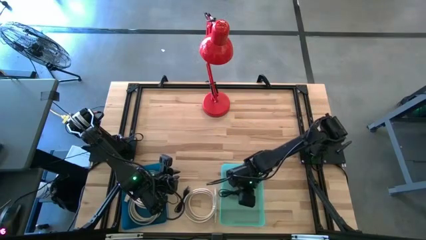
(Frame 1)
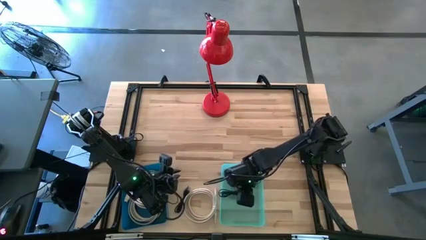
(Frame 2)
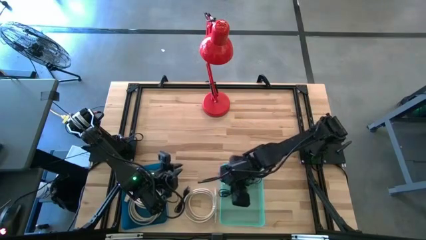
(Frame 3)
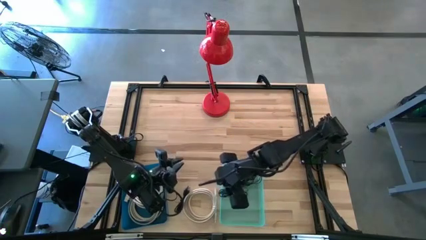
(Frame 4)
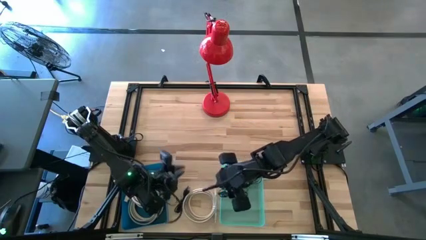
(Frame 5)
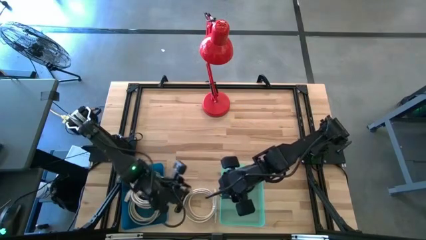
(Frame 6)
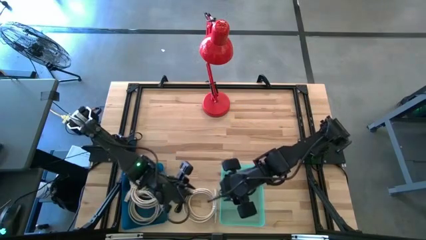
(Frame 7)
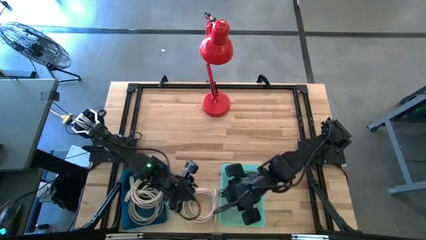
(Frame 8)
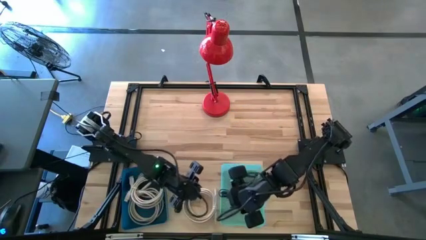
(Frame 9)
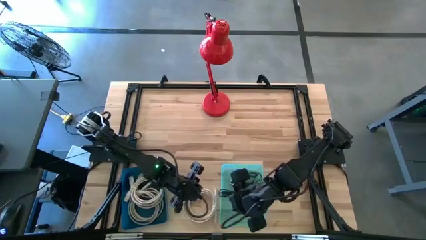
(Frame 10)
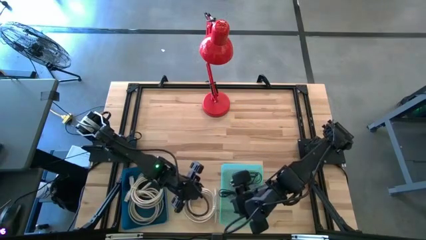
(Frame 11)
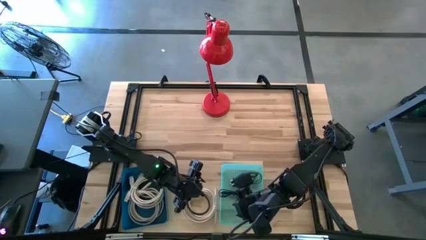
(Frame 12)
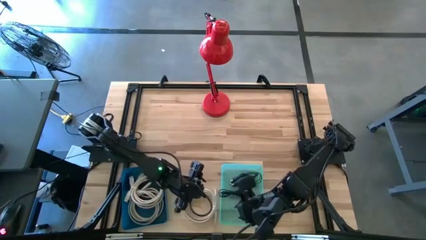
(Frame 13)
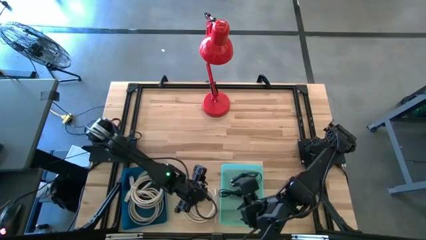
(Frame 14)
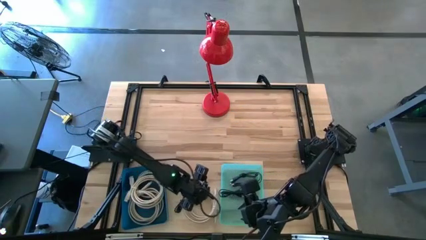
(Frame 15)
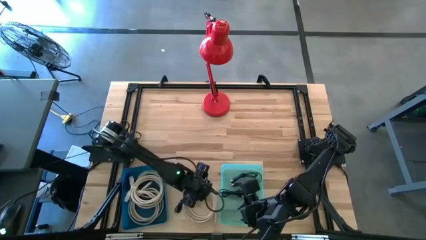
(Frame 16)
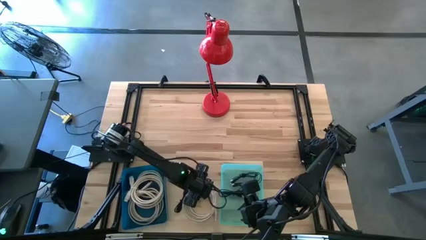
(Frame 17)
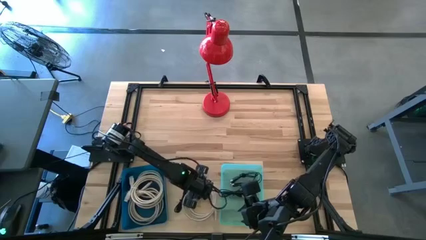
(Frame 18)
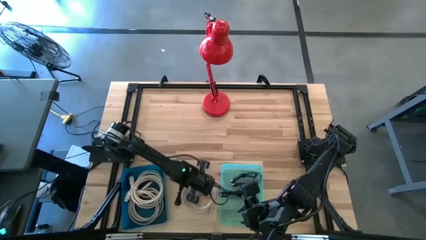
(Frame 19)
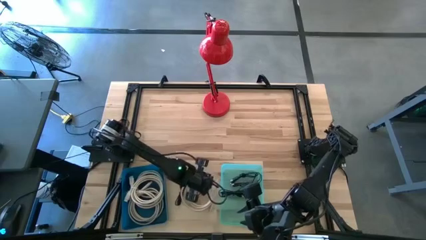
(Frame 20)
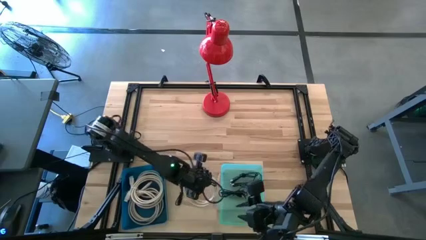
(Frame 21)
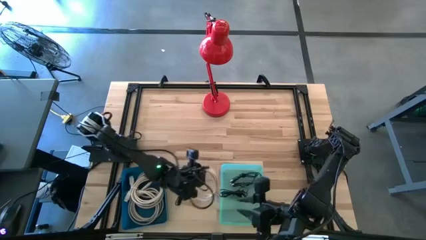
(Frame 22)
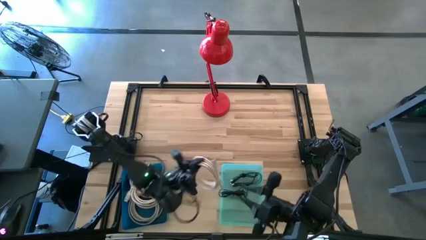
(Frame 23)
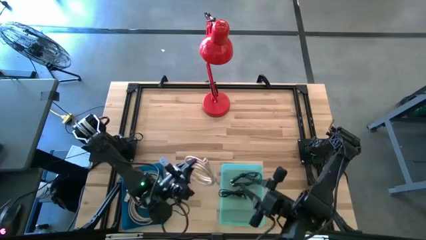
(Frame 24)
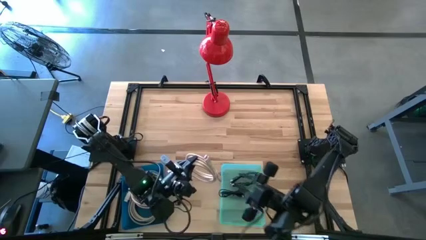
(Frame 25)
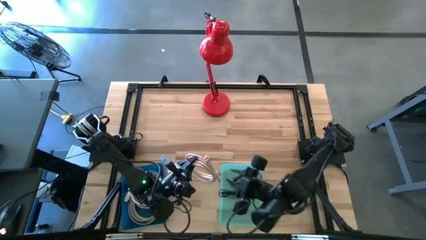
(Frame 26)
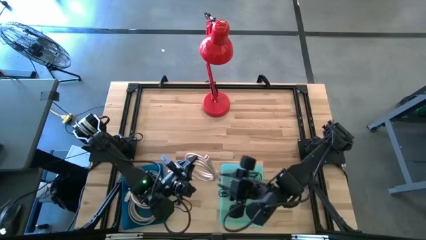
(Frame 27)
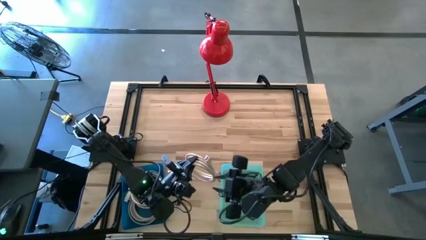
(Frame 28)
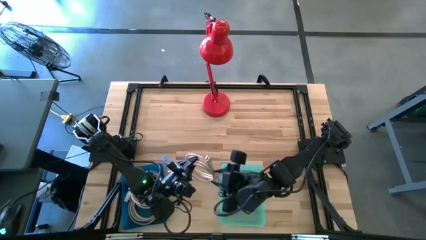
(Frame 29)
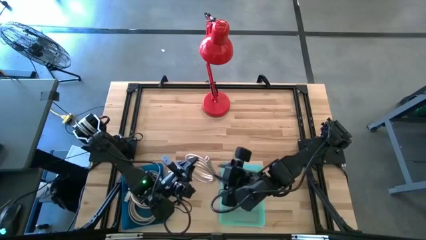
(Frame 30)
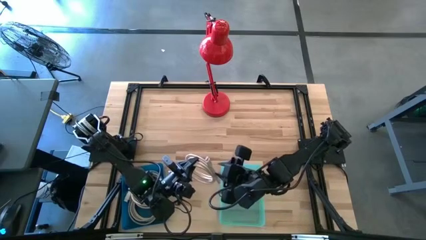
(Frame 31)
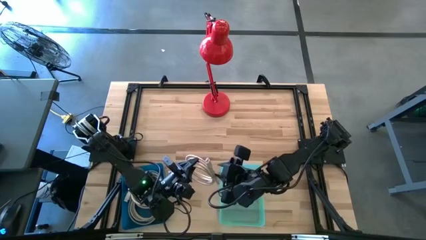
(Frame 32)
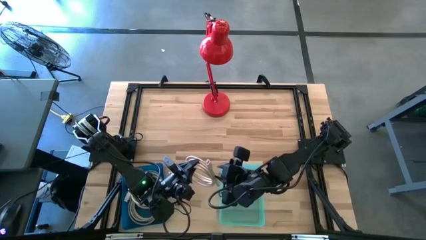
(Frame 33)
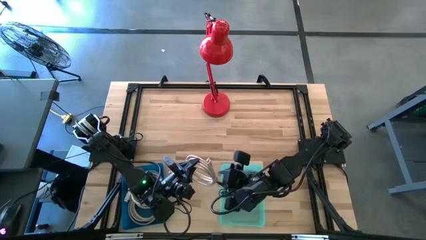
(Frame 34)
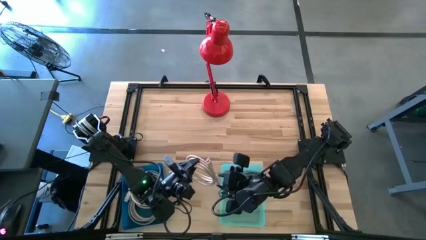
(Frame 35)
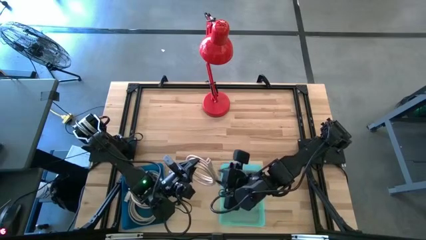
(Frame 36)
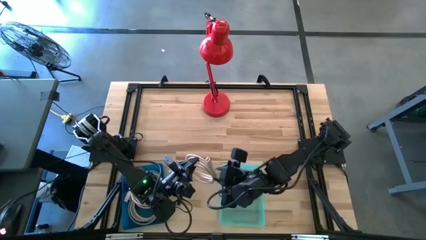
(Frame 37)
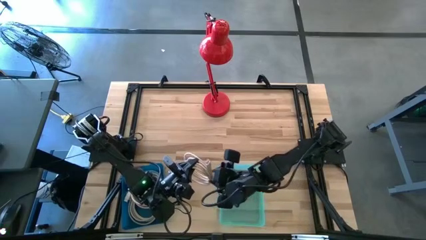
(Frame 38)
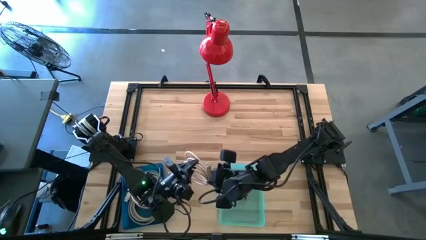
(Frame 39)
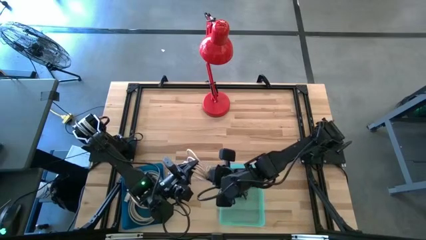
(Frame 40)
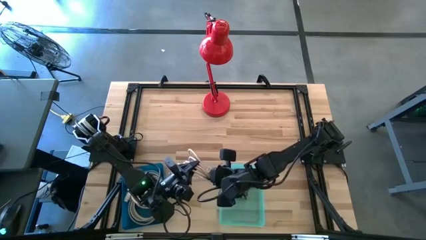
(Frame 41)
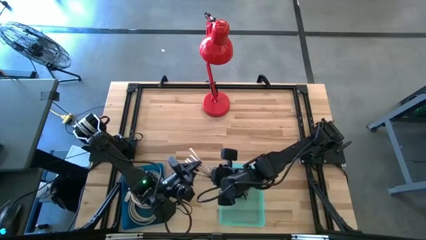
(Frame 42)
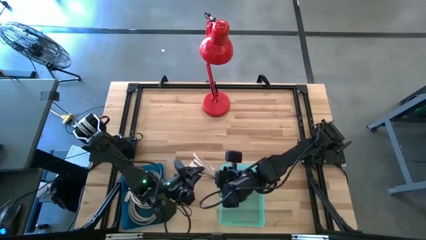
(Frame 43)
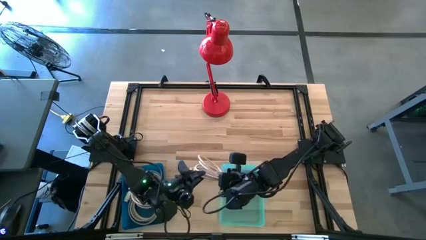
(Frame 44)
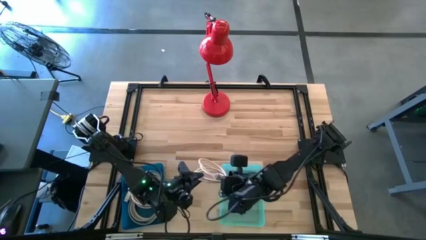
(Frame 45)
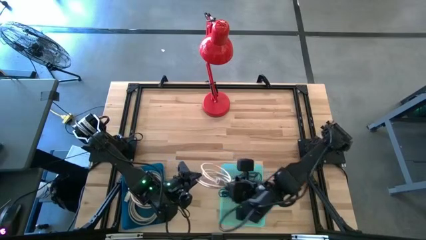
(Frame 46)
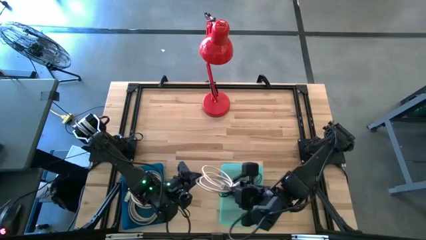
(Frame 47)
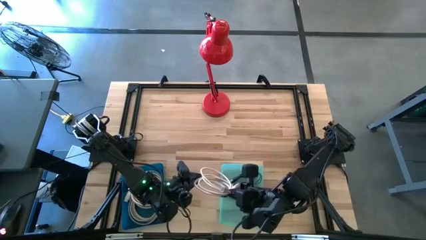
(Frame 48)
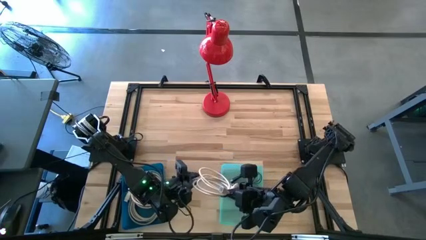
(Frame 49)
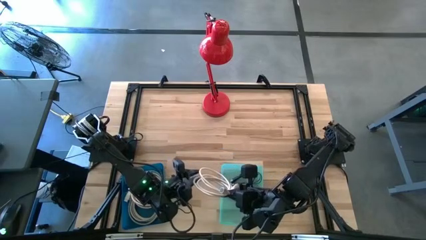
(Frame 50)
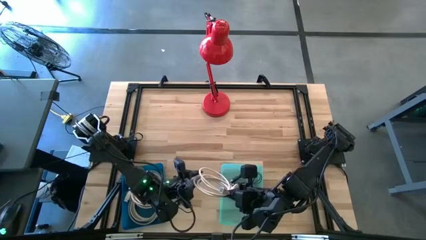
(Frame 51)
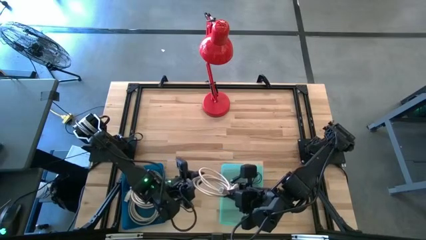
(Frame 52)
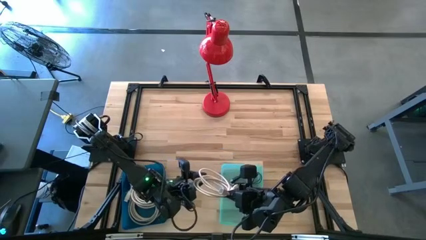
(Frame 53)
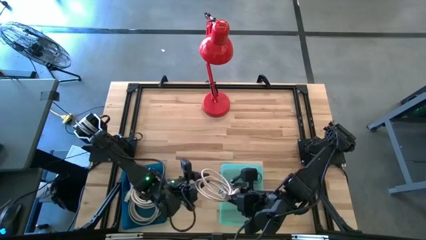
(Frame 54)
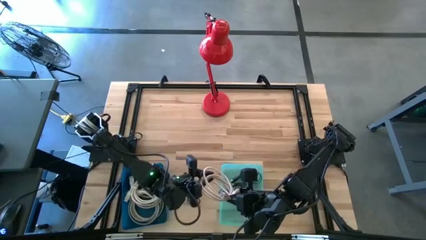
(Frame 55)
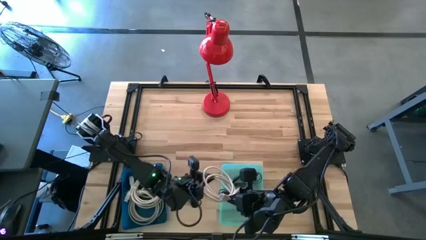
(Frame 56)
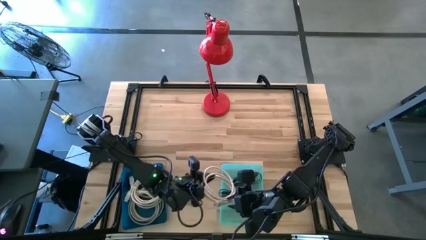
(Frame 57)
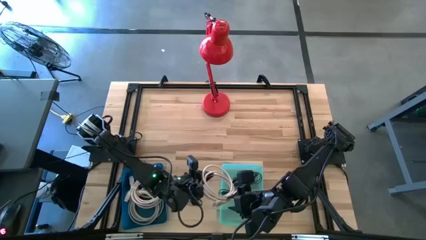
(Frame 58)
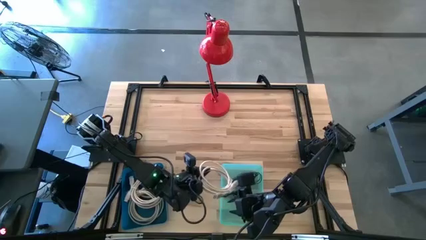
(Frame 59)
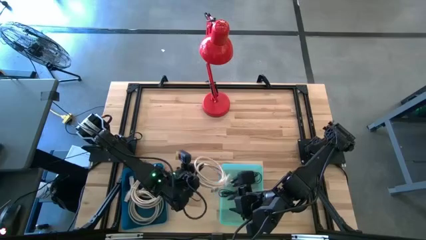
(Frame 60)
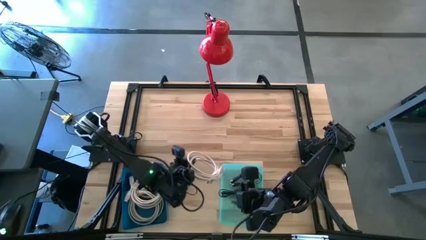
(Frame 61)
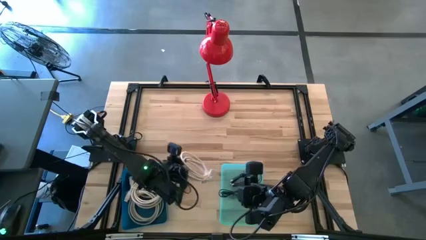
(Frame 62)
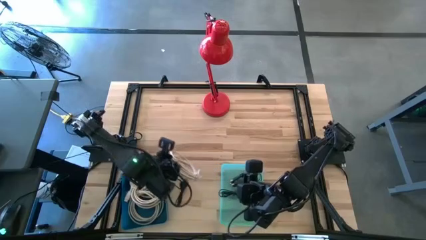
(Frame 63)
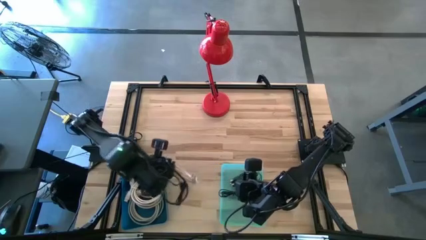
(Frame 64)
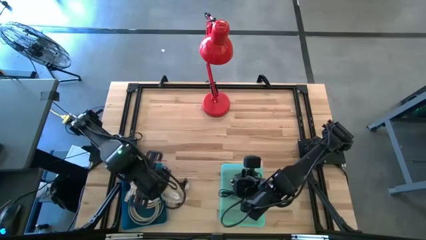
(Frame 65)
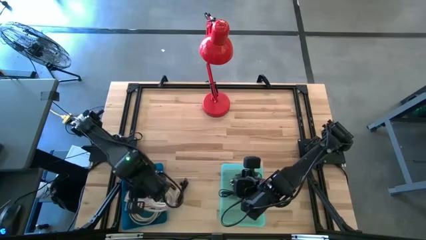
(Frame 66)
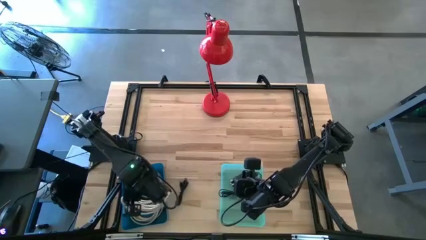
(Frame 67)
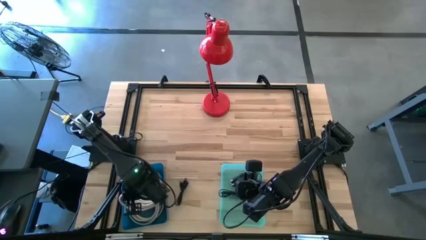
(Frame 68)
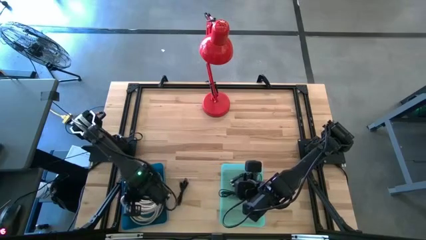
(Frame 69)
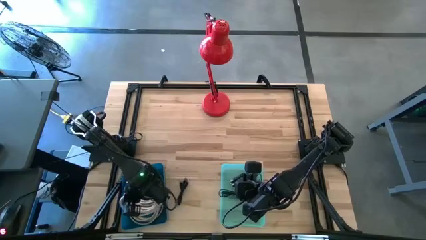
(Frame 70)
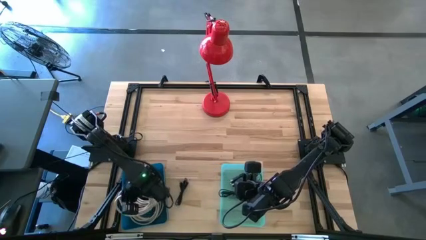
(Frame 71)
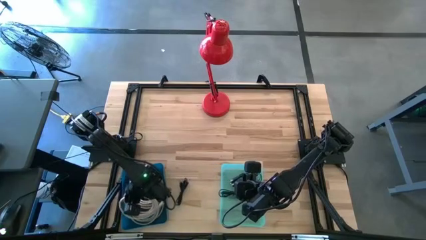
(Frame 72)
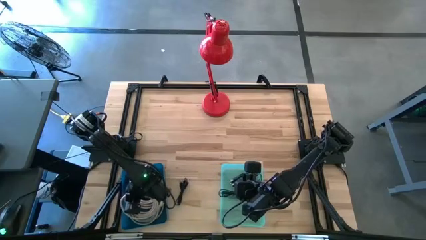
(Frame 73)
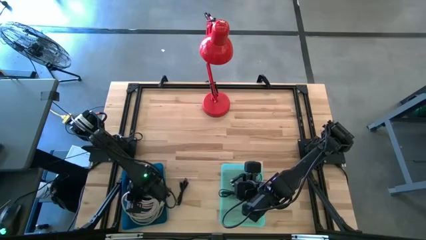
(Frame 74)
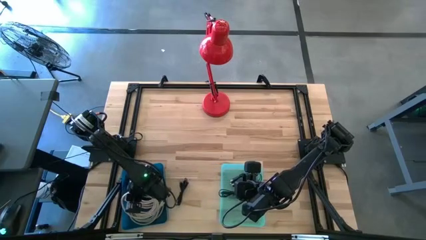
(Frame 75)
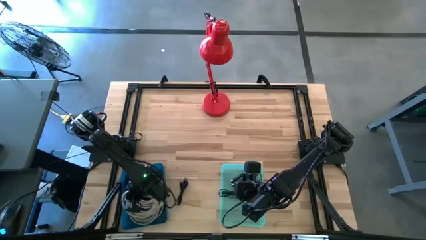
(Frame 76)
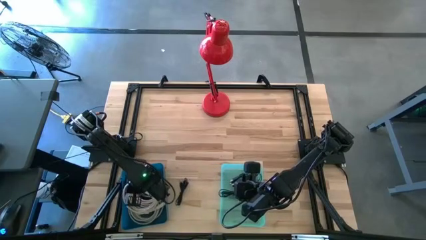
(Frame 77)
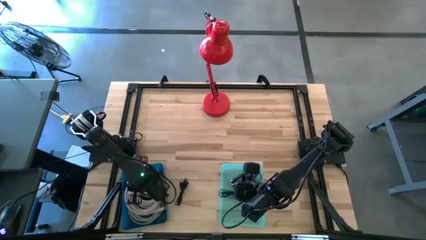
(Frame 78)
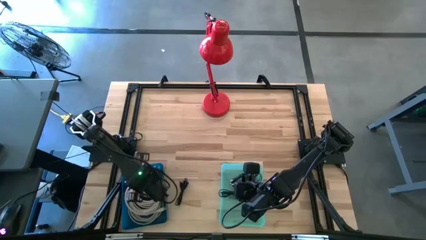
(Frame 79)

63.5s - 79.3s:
Task: Pick & Place USB Port
Put the brown HDMI cable into the blue bin

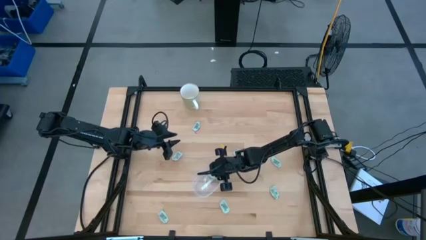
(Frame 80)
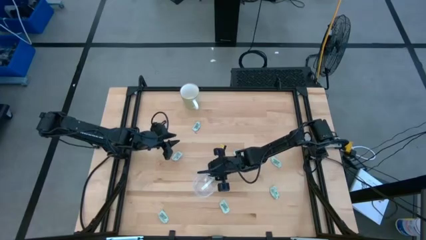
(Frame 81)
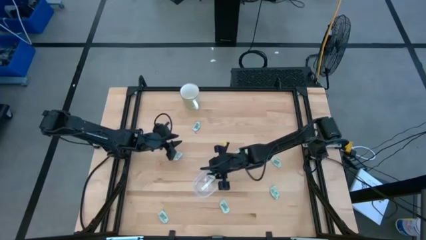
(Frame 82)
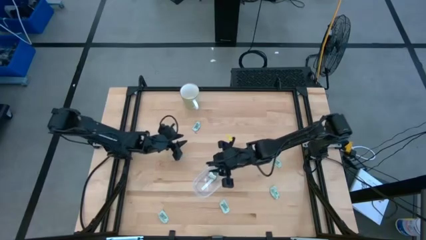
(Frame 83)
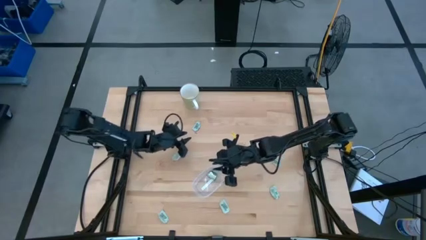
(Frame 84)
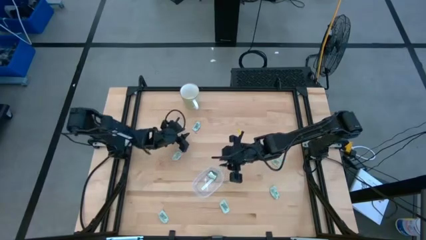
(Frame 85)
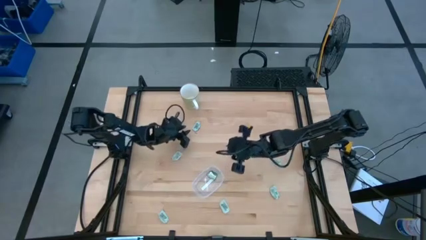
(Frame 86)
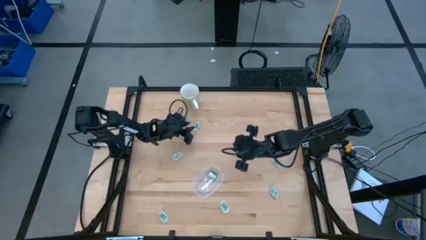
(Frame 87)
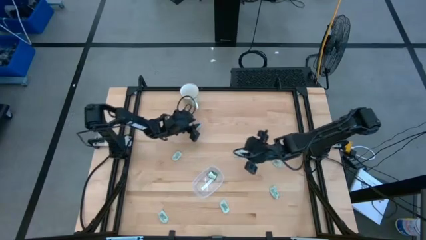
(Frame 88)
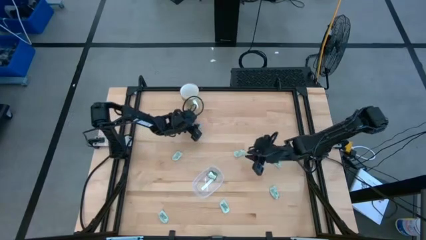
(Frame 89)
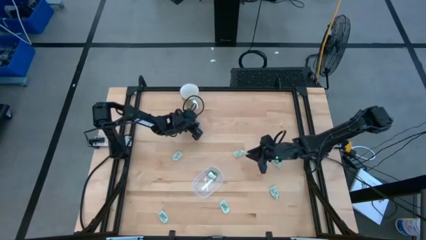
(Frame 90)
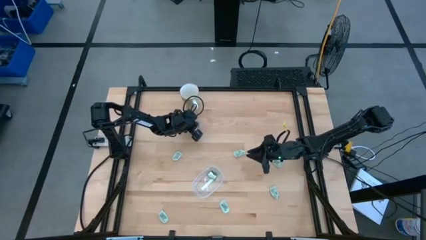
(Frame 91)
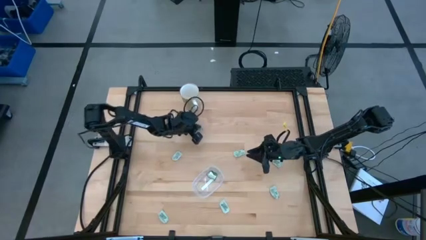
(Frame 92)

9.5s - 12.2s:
Task: Pick and place Stevia / Truvia into bins
Put the light green stevia packet into the transparent bin
